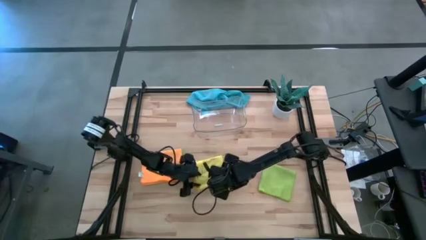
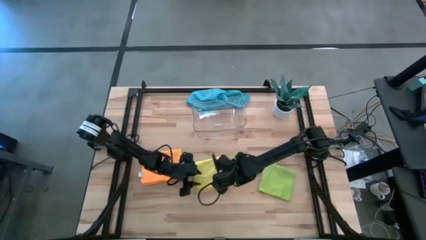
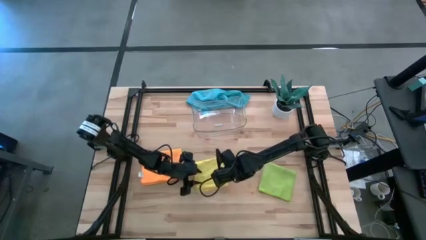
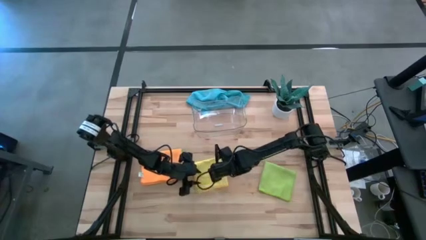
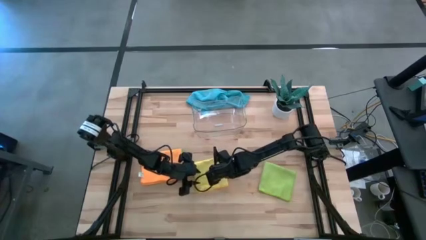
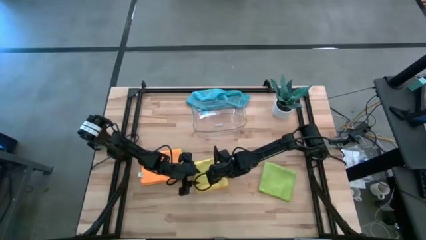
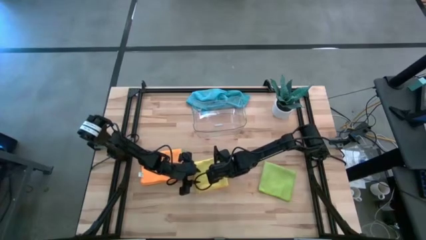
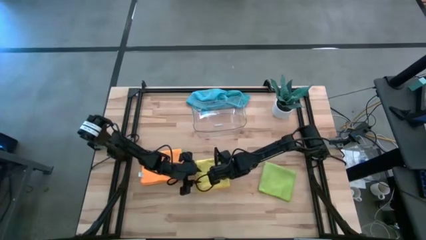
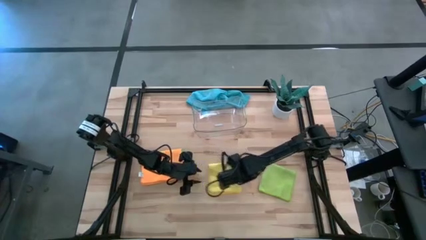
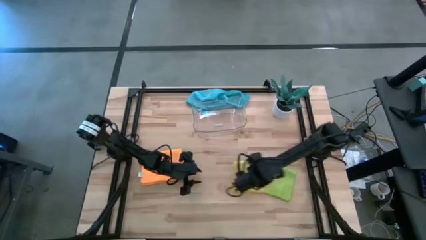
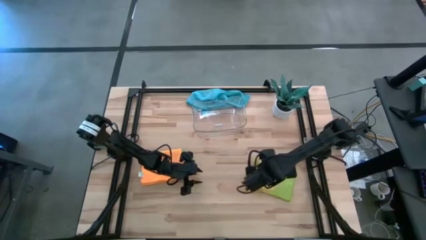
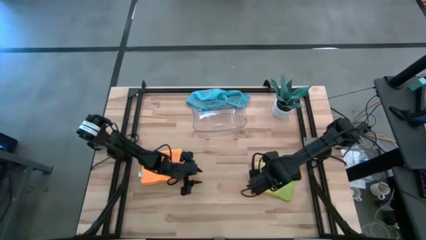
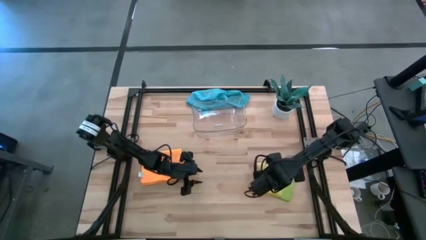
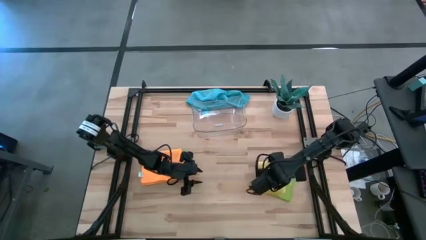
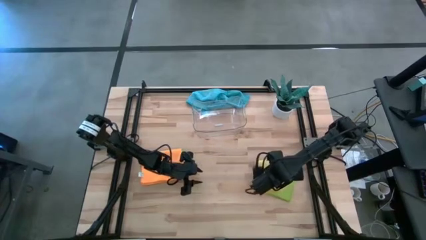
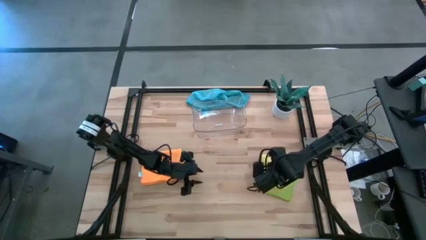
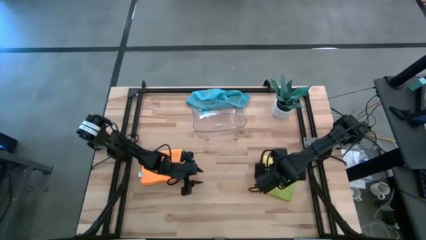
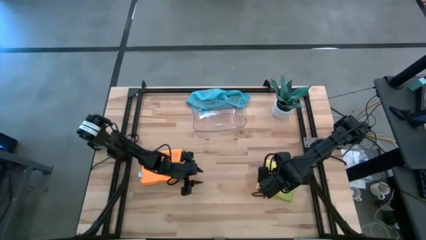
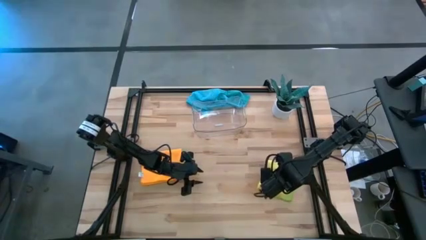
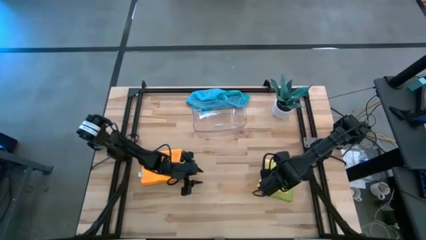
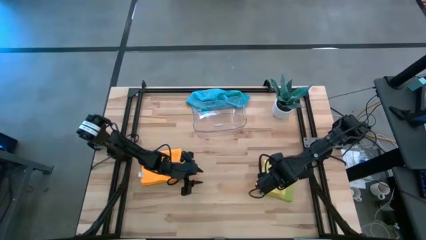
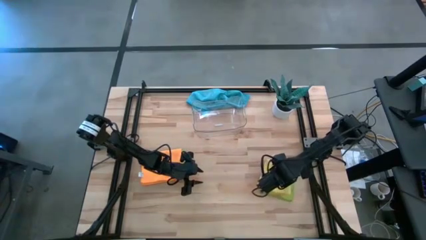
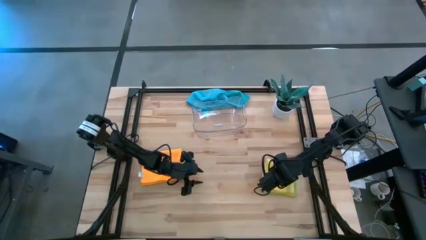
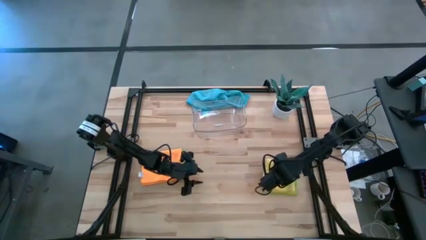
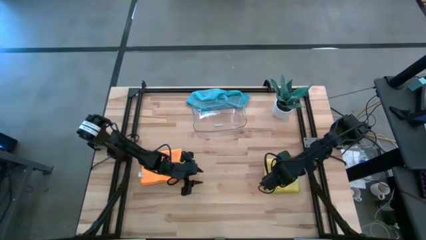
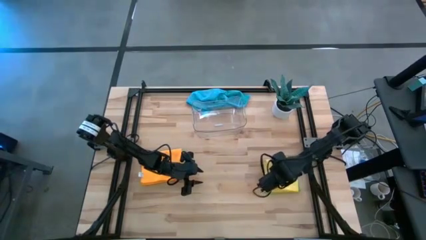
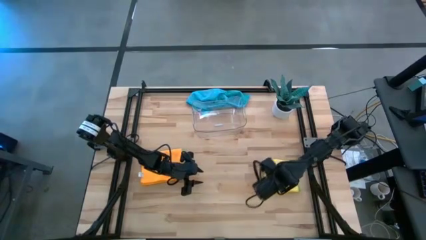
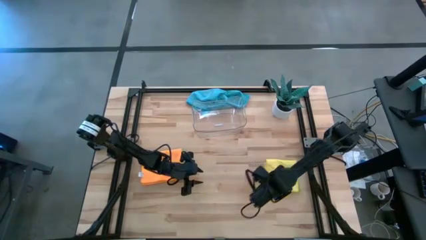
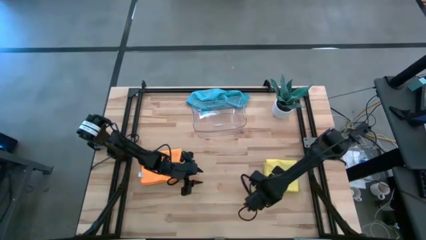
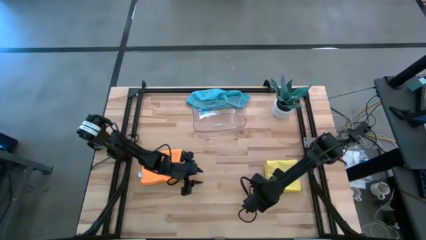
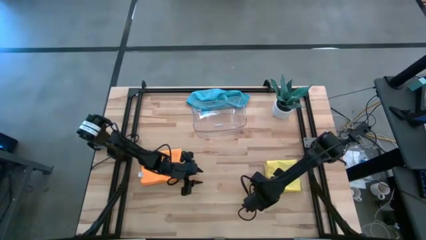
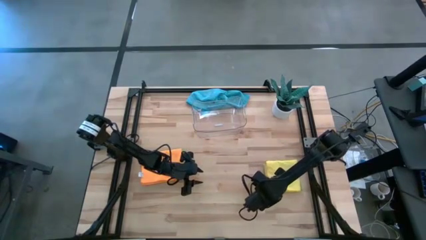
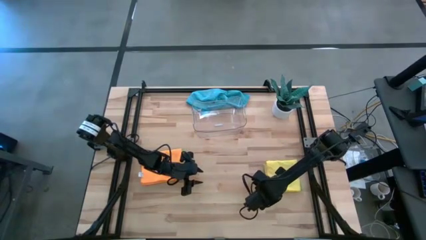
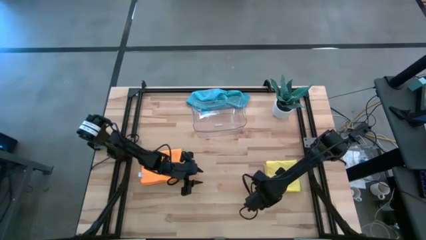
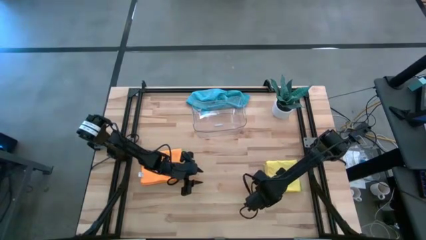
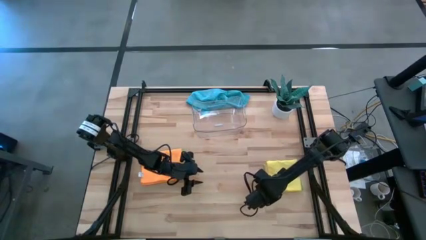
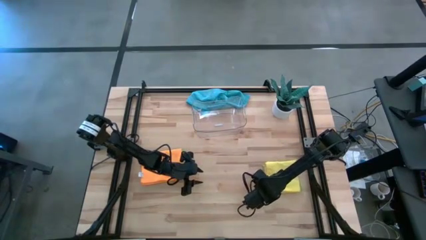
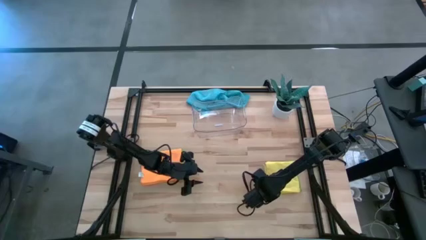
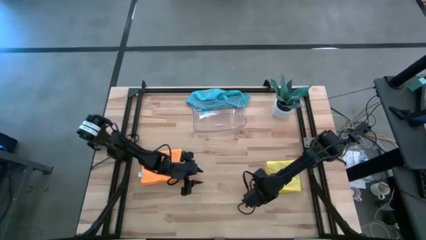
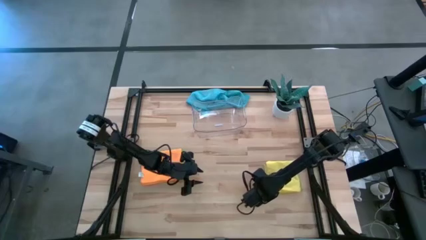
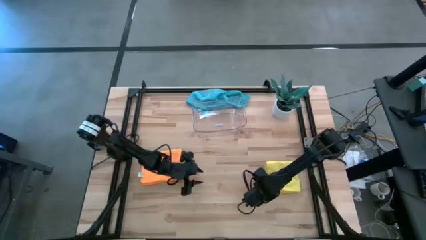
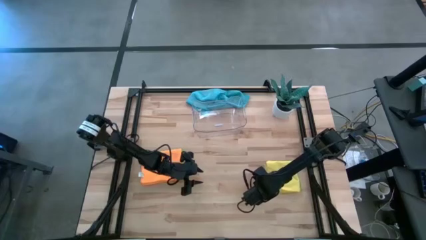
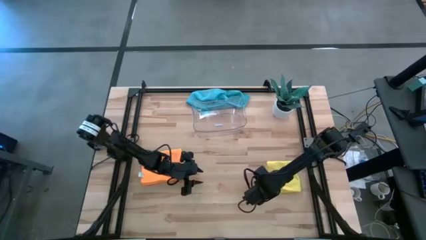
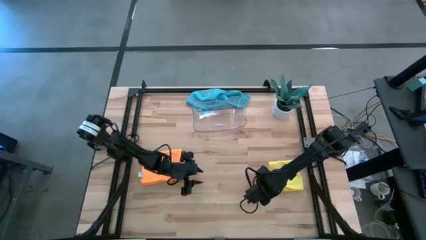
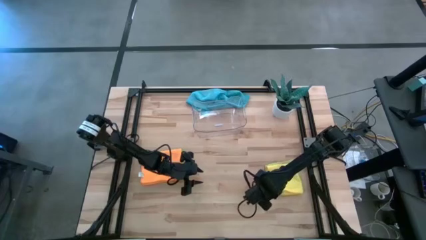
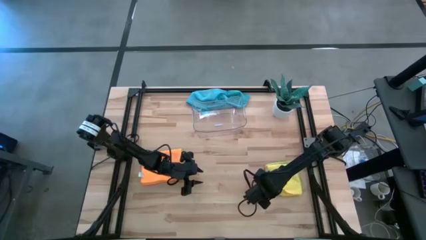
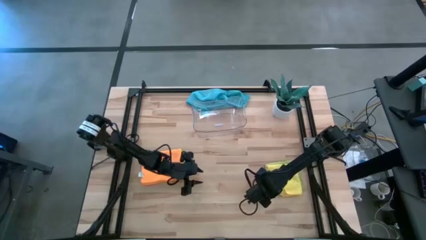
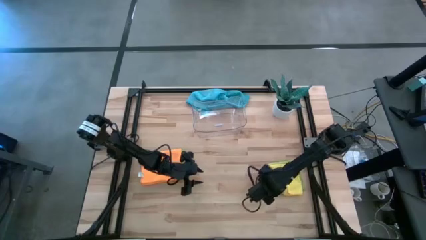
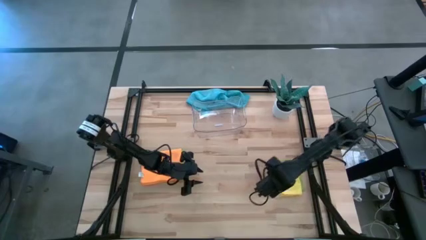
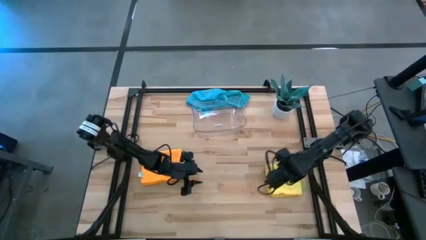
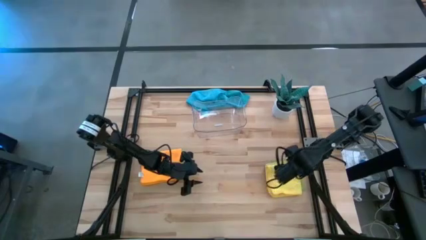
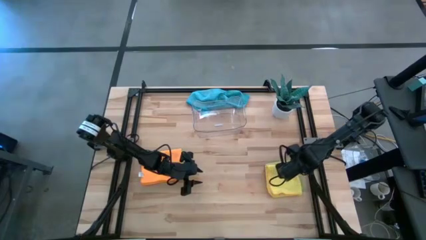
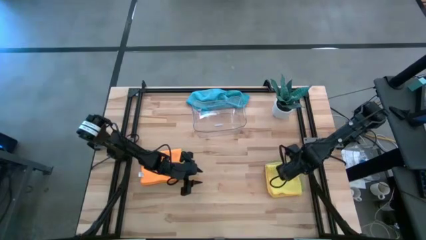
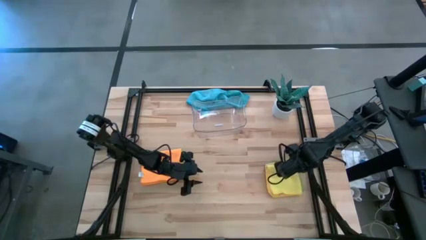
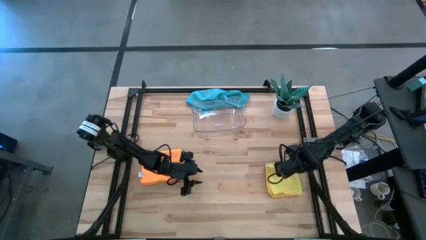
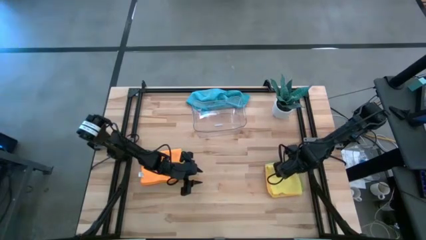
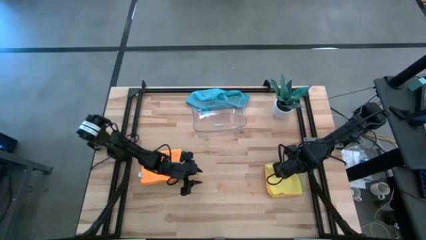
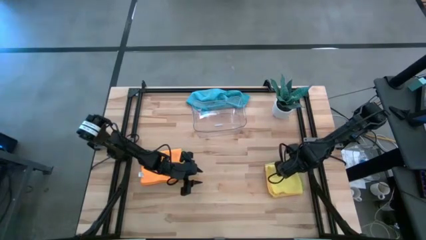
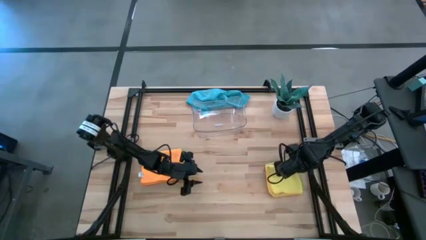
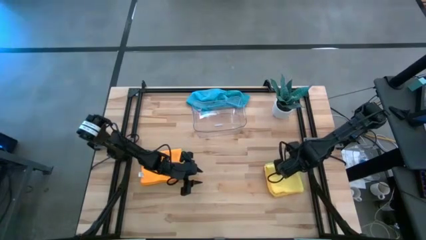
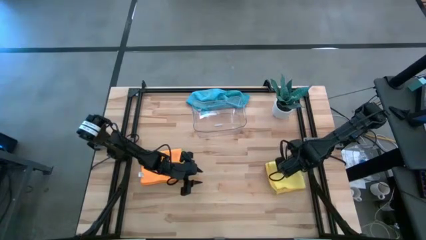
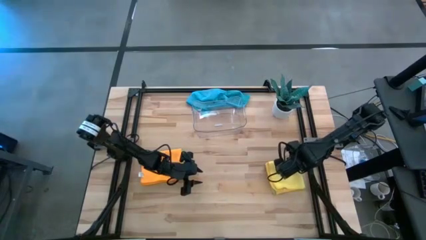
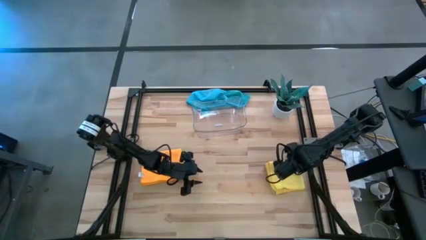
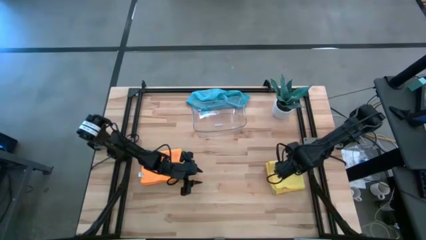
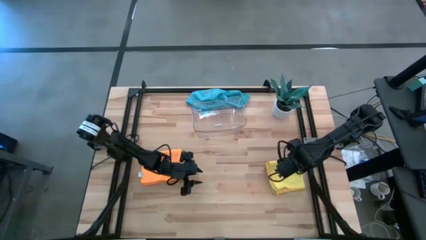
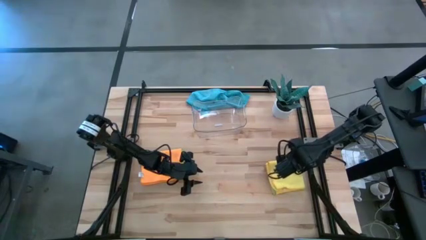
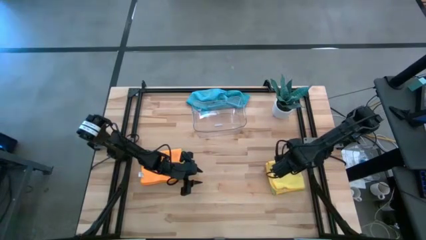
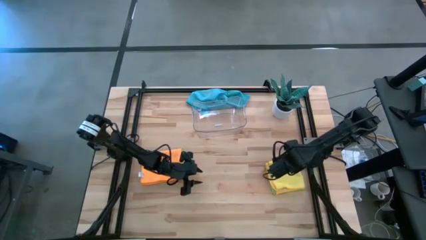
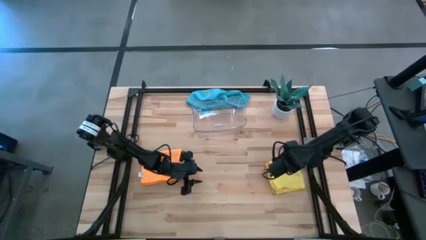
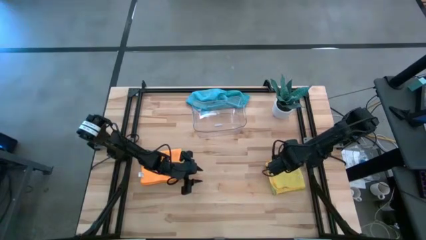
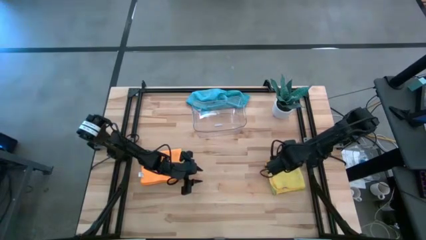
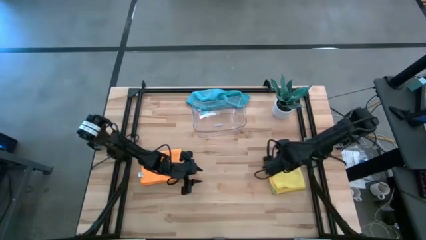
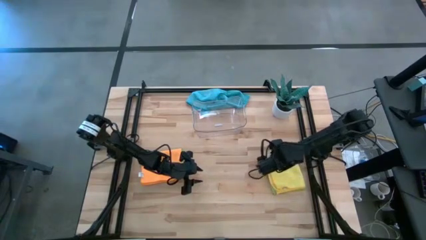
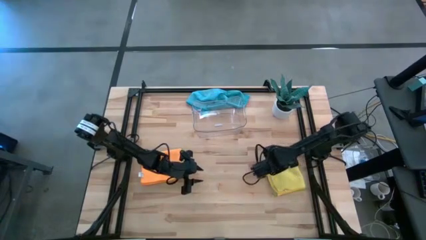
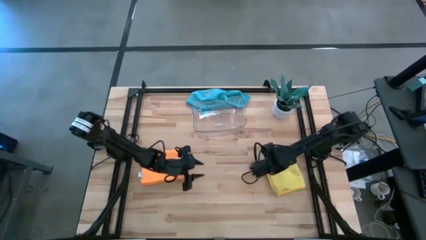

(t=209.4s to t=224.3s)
Task: Fold microfiber towels
Stack the yellow microfiber cloth on top of the light green microfiber cloth

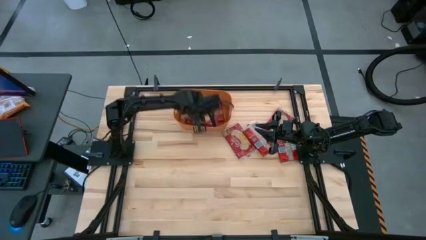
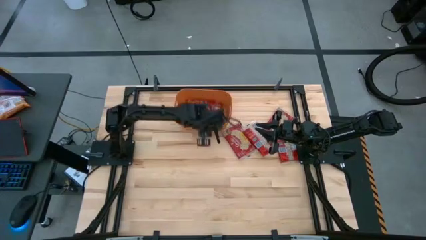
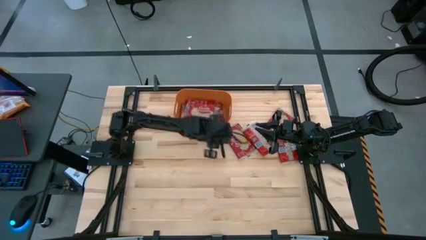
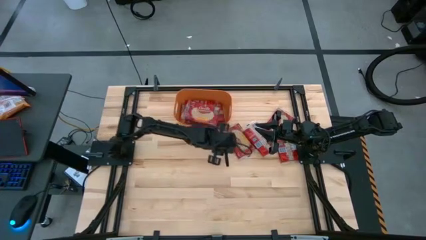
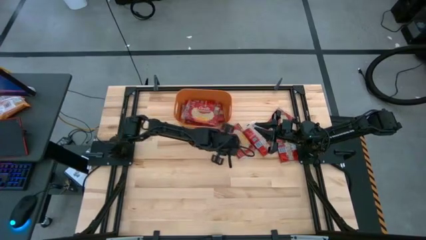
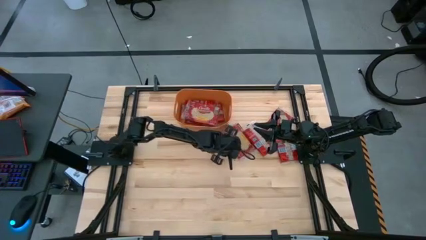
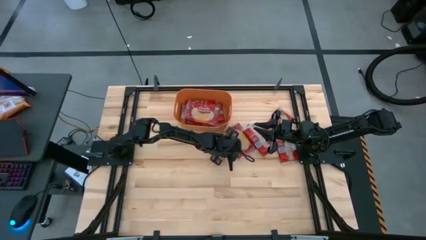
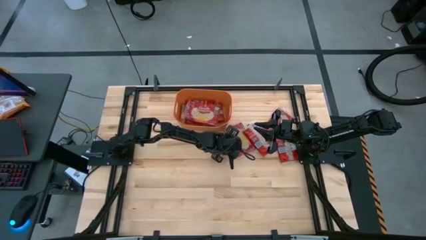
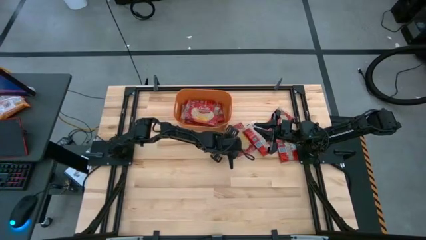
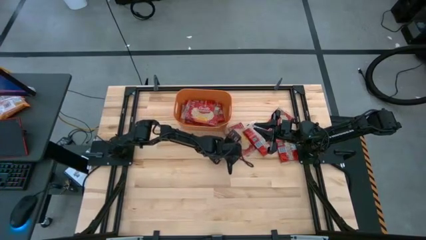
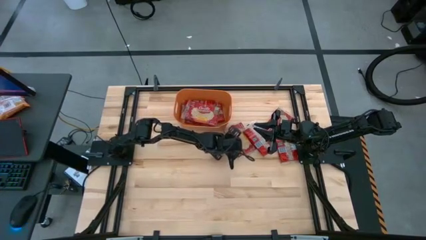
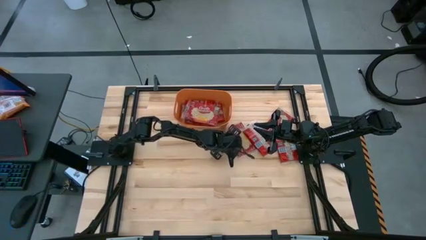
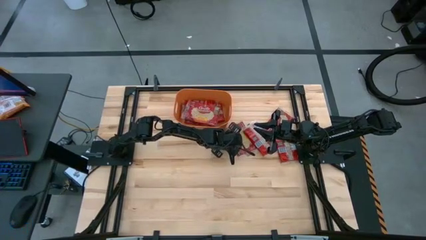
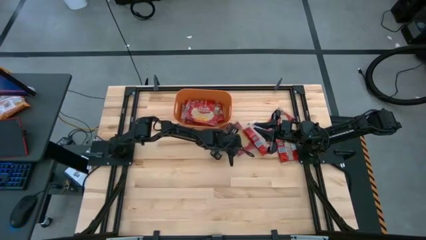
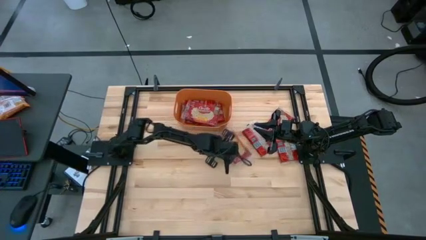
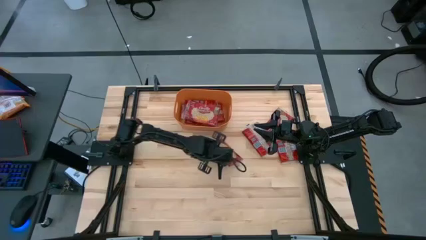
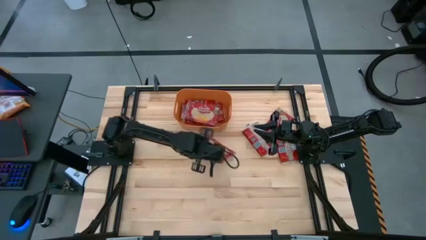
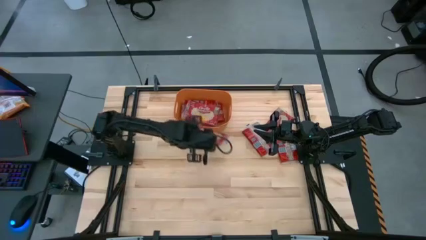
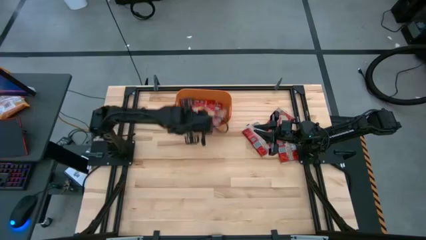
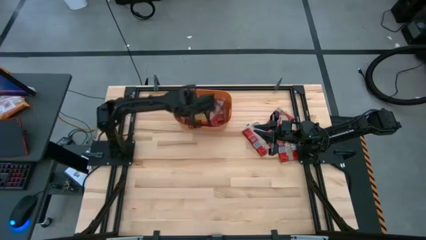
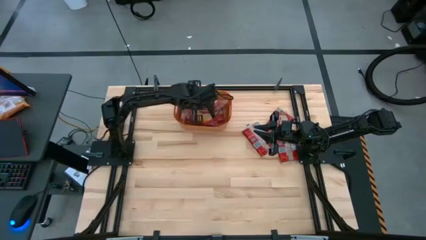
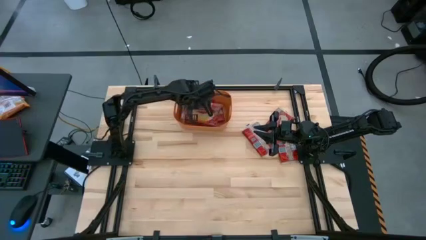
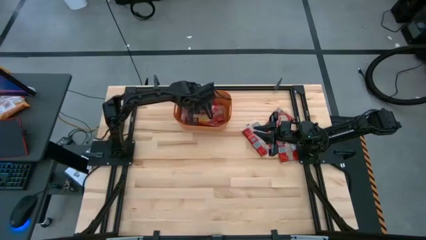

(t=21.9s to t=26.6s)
Task: Sort popcorn bags into baskets
Put the red popcorn bag into the orange bin
